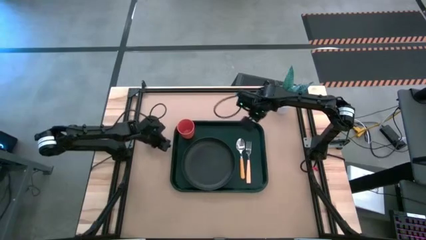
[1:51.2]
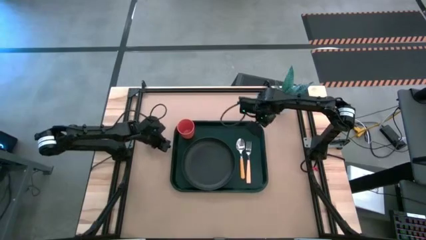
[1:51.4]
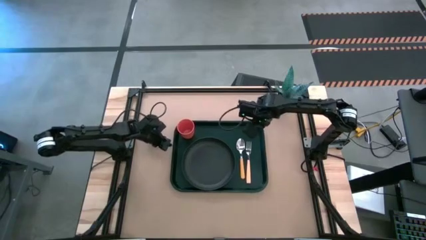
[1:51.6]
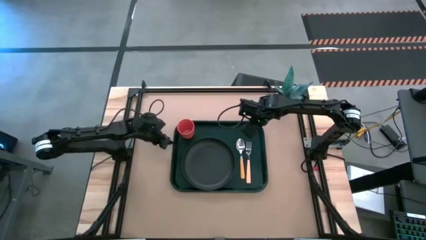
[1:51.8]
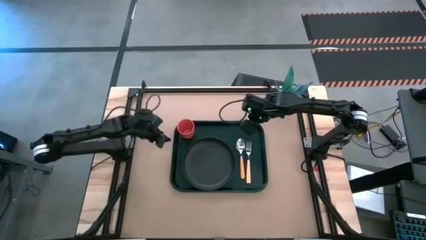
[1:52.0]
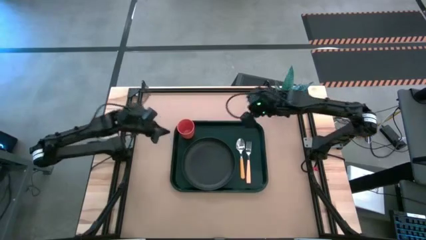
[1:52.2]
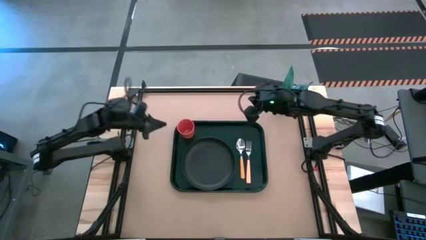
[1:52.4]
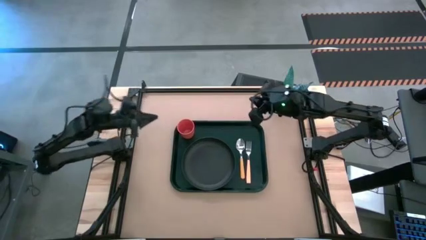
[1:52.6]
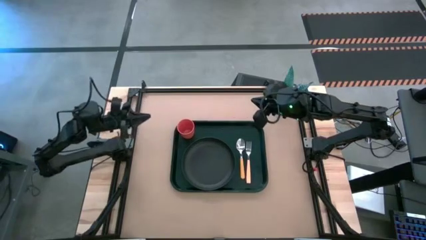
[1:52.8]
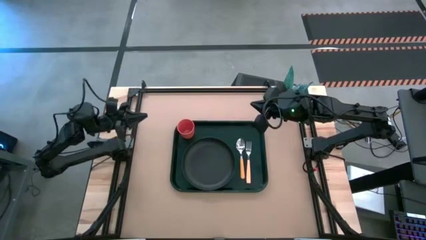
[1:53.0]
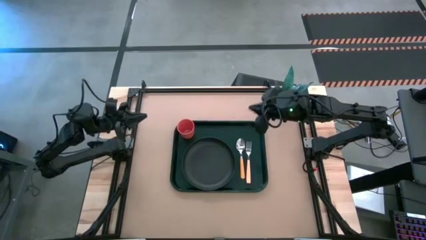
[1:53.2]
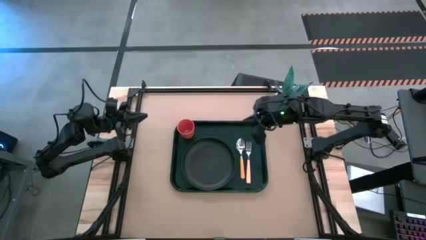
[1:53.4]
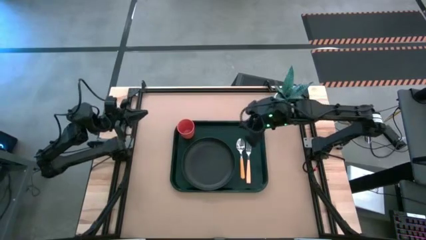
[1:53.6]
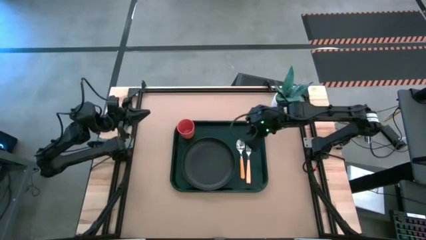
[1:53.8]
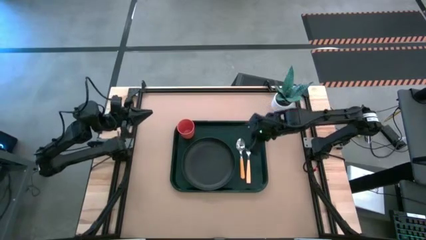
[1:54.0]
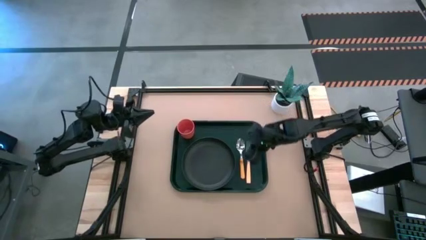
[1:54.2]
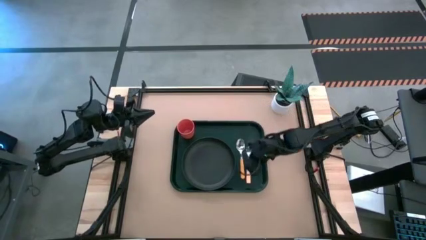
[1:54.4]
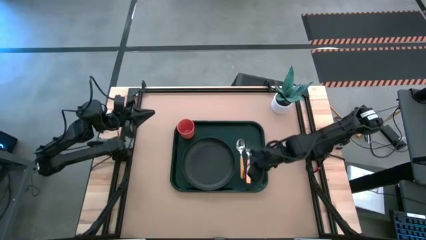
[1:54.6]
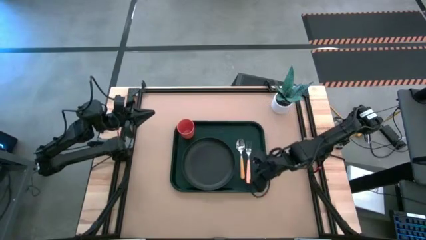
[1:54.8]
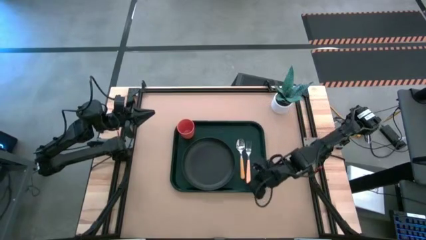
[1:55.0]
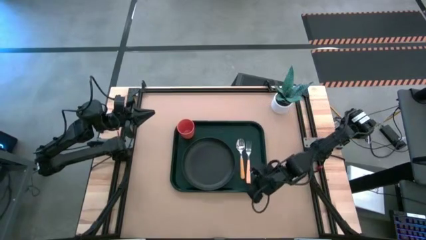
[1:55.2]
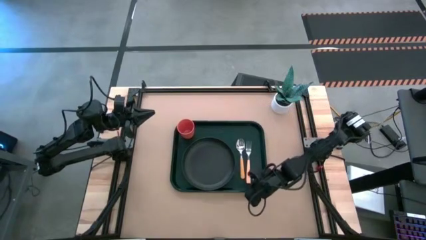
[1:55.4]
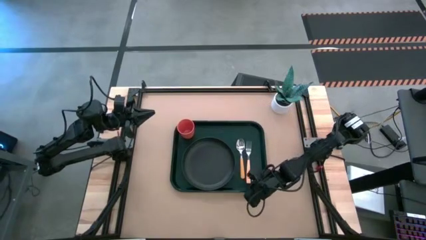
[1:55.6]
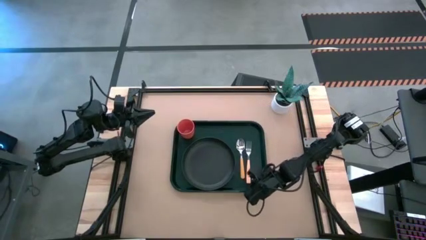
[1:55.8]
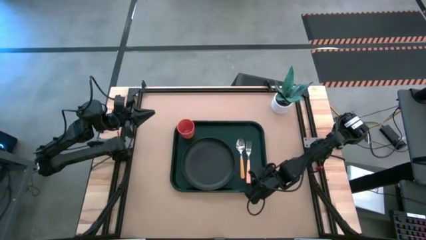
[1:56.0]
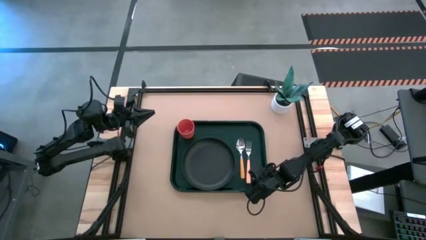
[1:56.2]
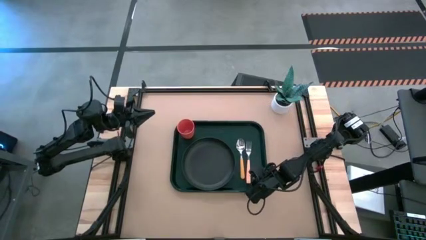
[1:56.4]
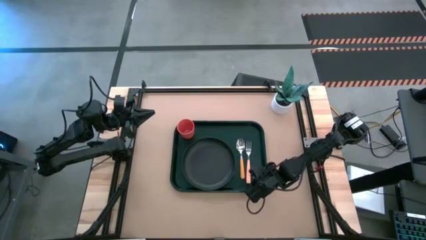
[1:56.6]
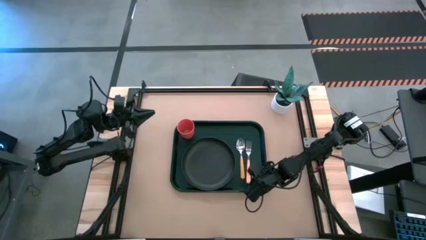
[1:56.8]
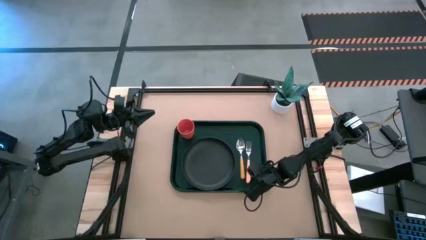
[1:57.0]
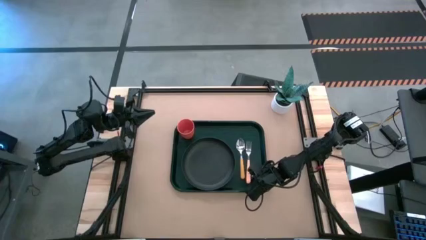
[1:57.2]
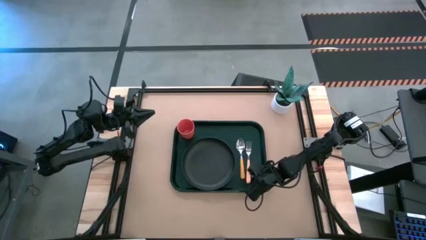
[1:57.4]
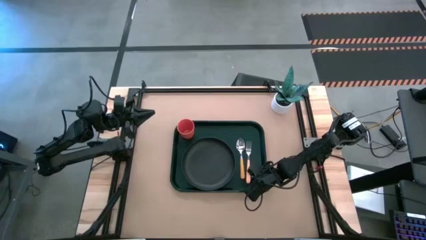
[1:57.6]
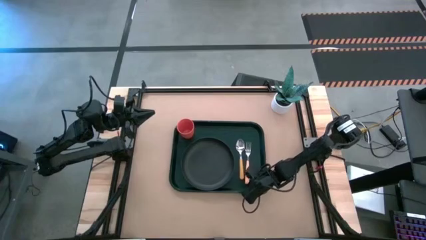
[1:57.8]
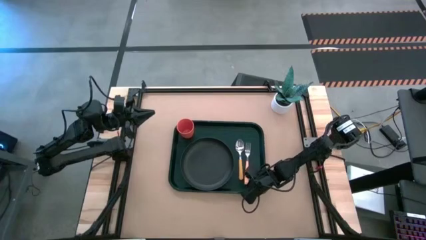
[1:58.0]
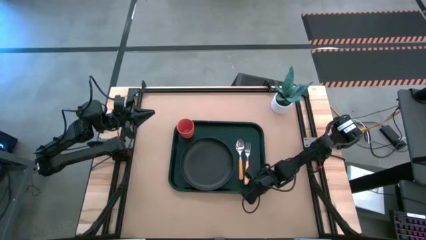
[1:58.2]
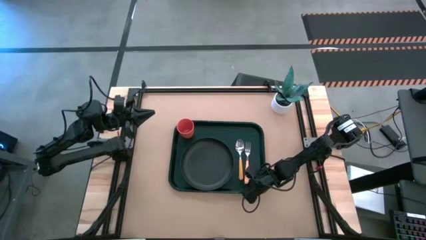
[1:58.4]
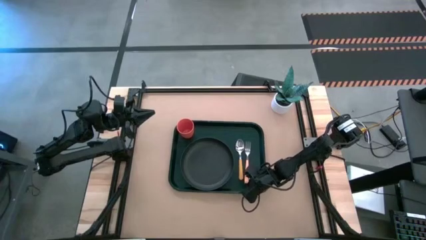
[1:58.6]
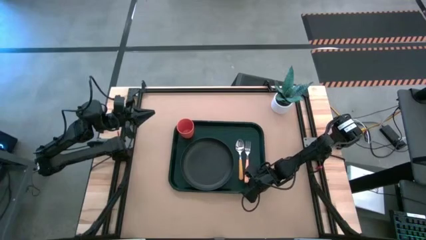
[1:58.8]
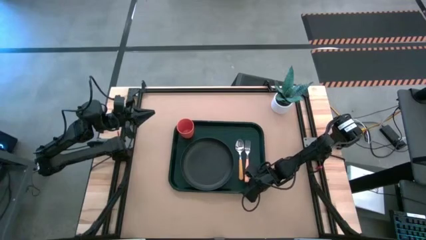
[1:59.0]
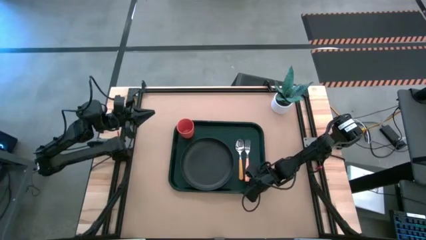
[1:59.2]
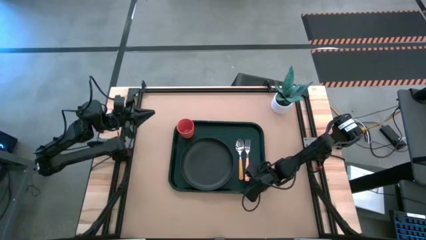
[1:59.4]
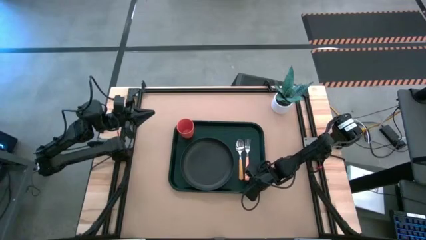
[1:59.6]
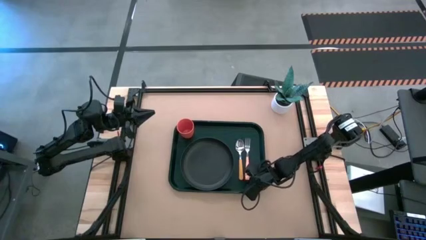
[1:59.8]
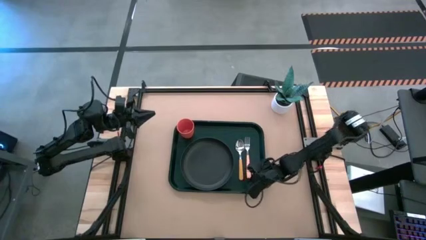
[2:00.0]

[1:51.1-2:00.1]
Task: Pick and place plate/cup/fork/spoon on tray
Adjust the orange fork on the black serving tray

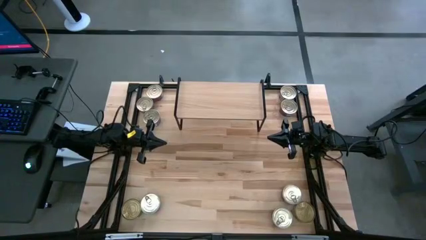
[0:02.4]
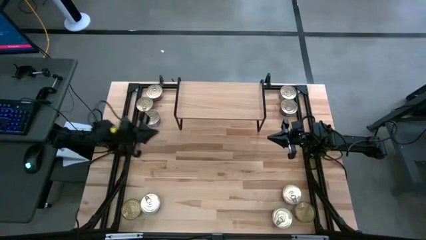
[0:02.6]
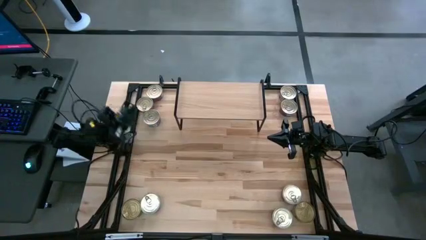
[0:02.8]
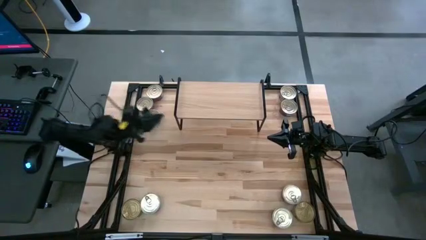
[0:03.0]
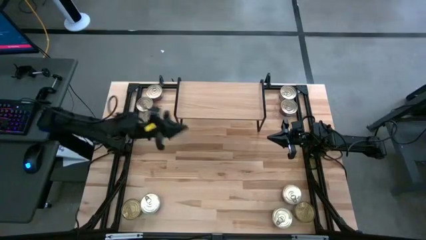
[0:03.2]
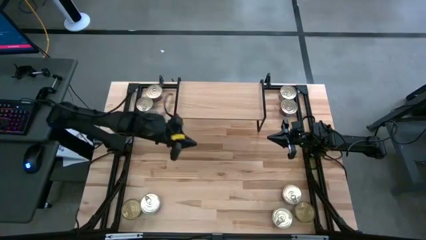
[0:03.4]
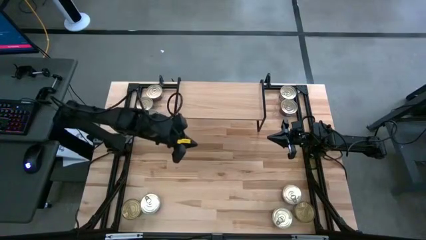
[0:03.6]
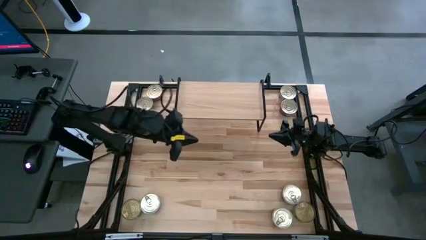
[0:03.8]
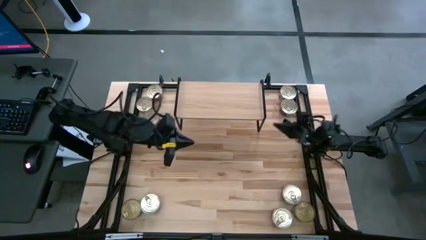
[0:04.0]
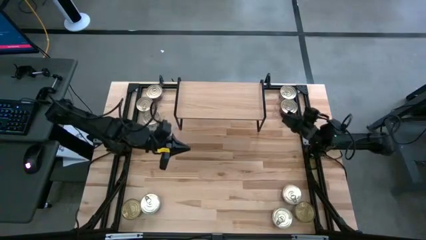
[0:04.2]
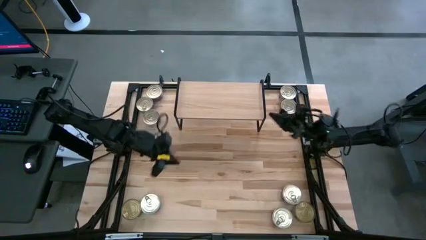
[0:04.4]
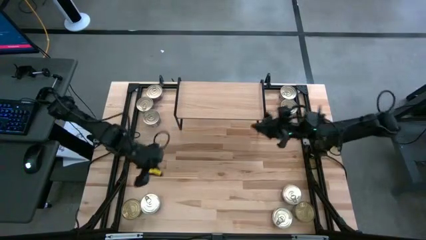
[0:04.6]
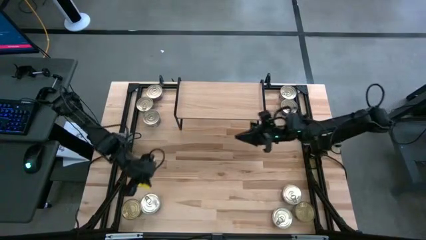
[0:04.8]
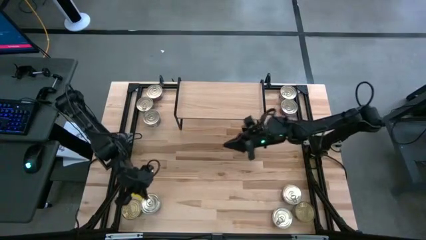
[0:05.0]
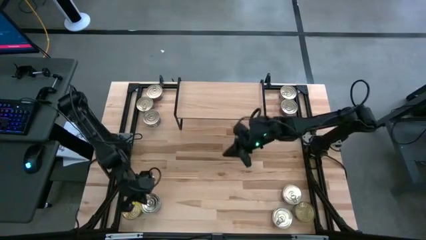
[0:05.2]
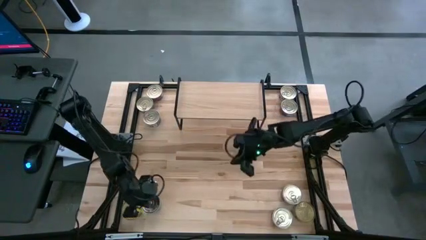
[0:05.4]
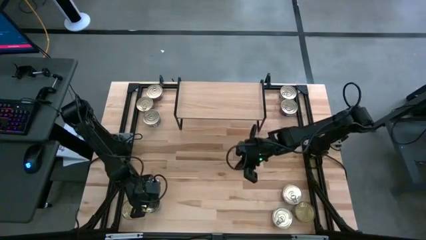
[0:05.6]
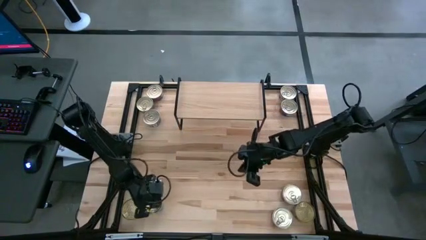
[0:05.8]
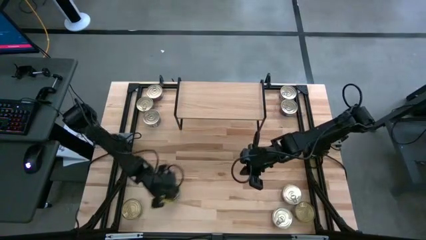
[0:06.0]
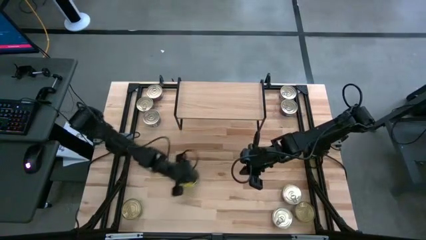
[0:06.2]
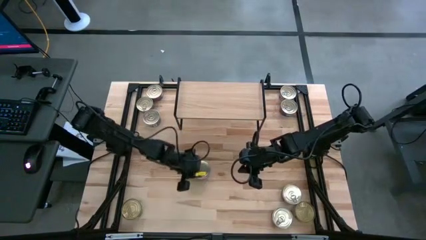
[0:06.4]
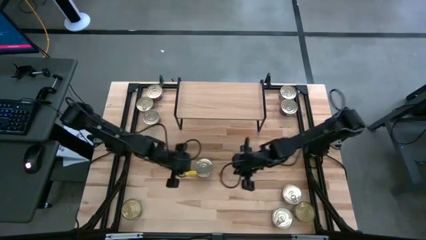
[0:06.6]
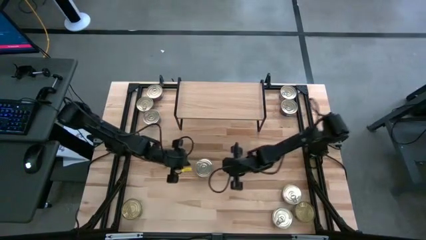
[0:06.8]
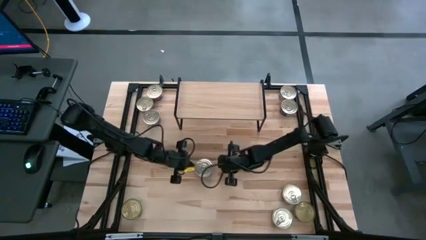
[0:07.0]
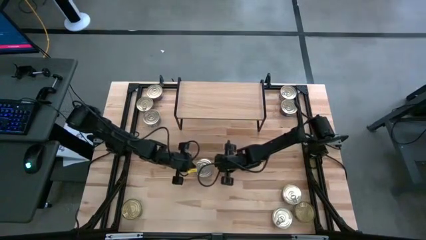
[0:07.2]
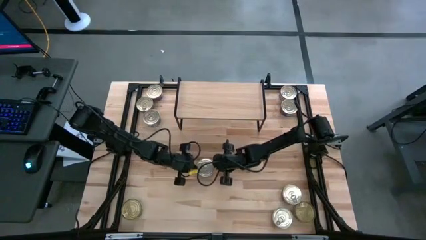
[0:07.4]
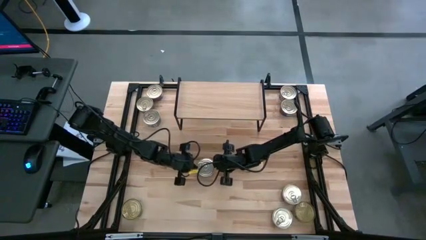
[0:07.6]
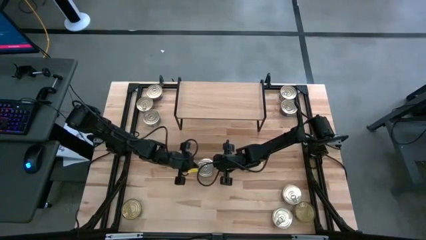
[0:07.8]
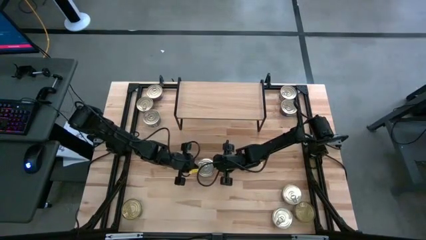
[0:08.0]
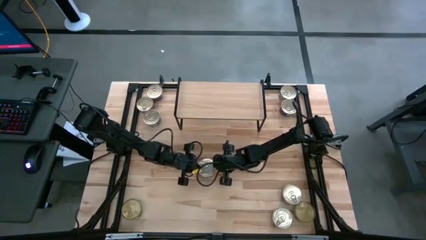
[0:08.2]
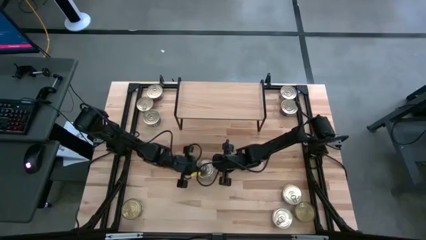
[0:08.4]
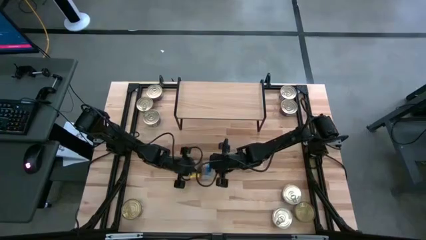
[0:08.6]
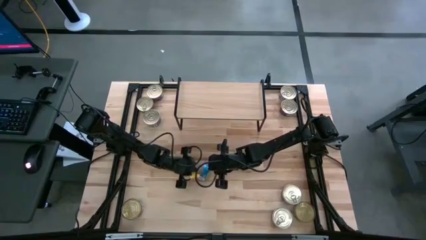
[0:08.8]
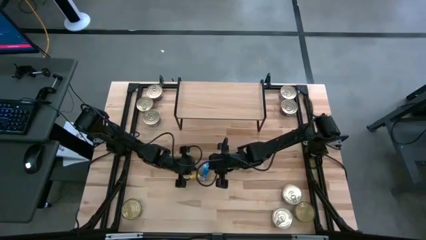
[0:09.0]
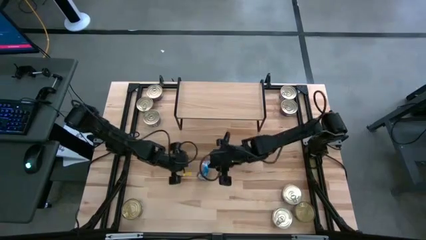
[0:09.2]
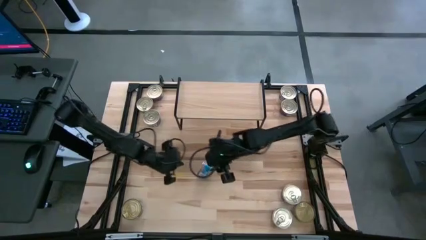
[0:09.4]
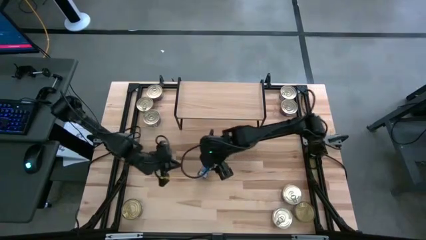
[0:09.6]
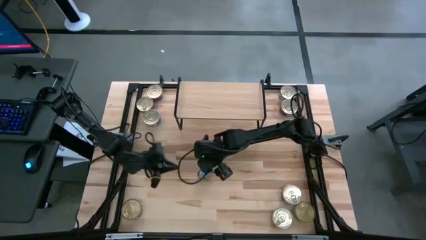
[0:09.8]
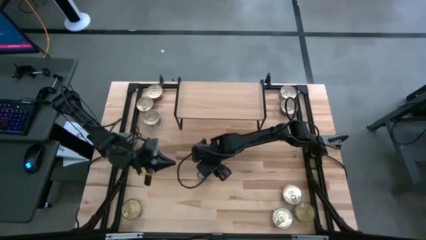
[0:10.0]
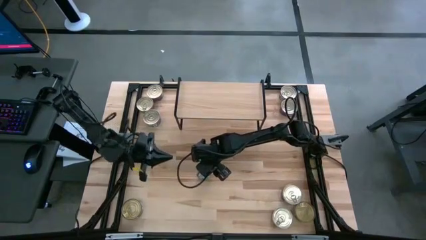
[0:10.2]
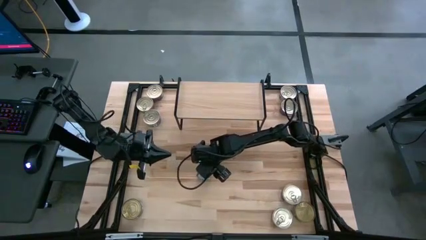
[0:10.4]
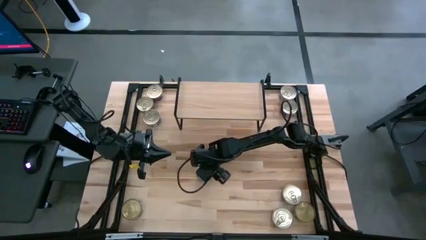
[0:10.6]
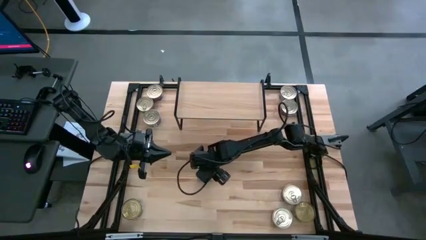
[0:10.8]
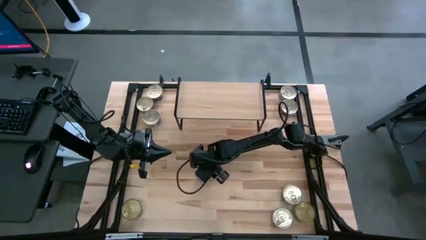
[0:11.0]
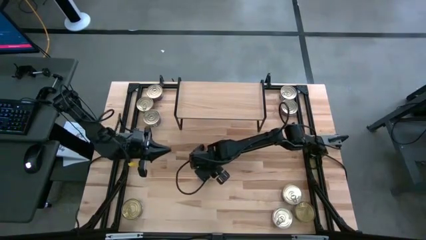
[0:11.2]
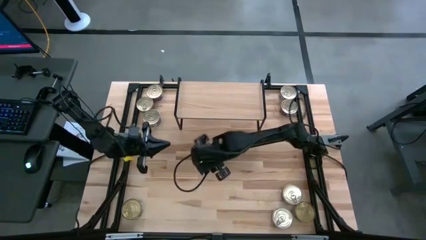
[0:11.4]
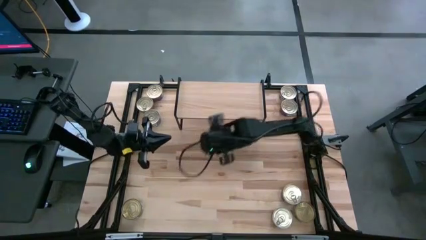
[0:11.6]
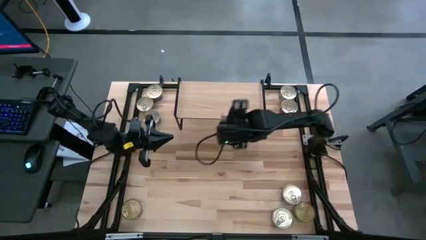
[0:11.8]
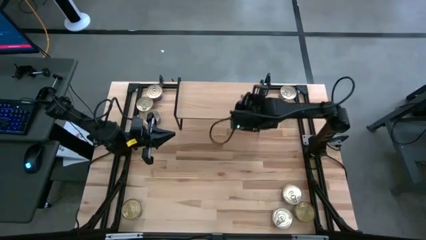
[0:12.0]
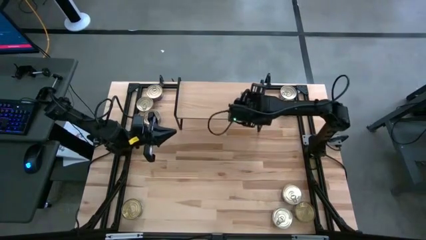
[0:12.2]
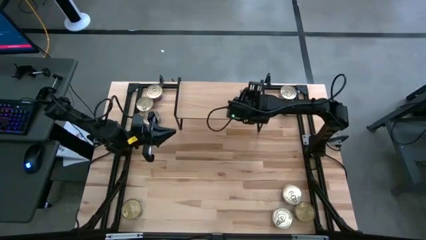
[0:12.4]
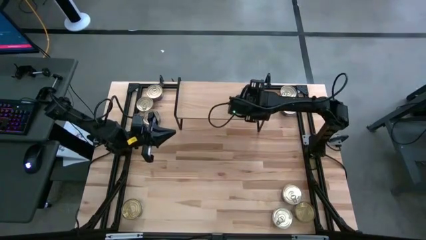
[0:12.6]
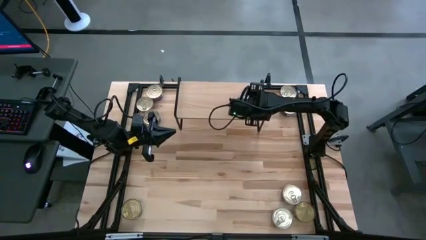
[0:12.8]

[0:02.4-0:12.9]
Task: Stack canned seafood by type on shelf
Put the blue tuna can on the shelf
